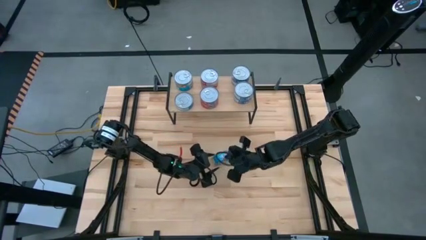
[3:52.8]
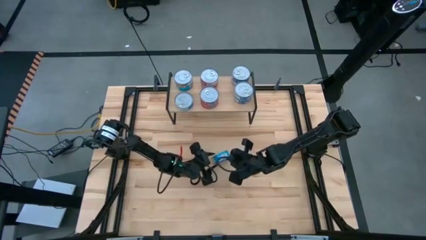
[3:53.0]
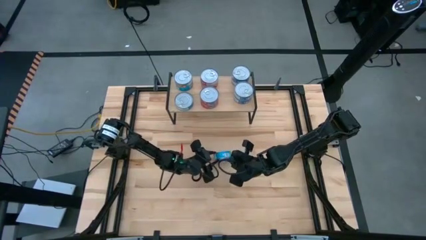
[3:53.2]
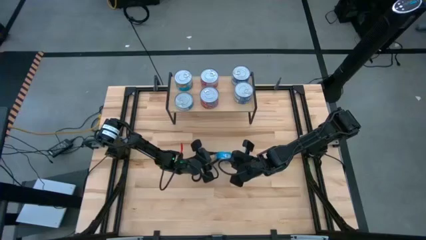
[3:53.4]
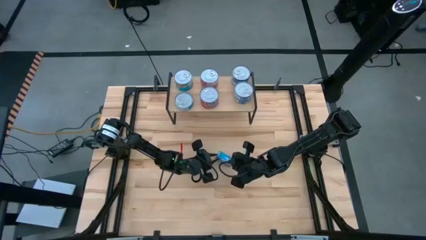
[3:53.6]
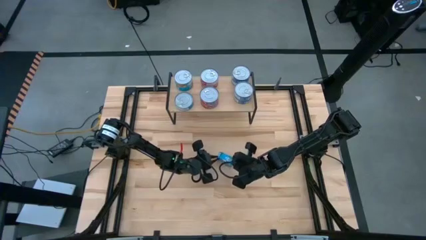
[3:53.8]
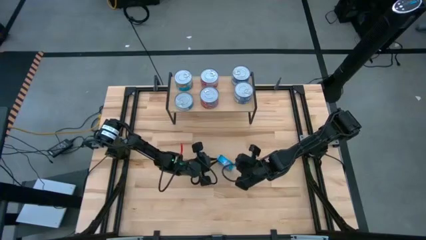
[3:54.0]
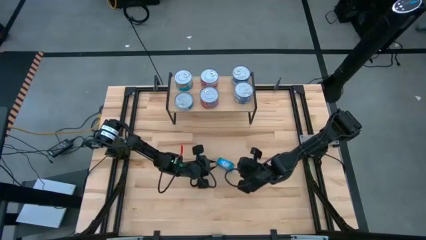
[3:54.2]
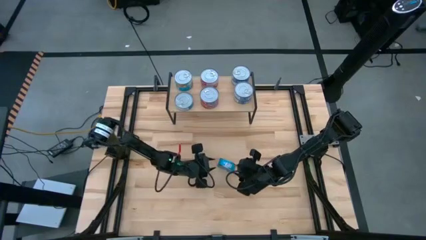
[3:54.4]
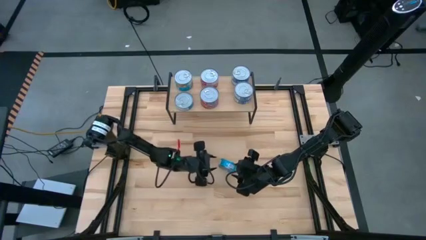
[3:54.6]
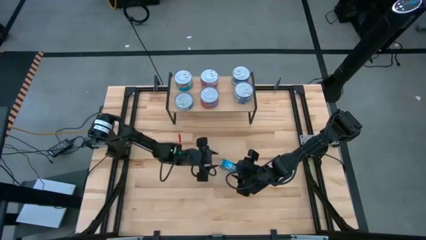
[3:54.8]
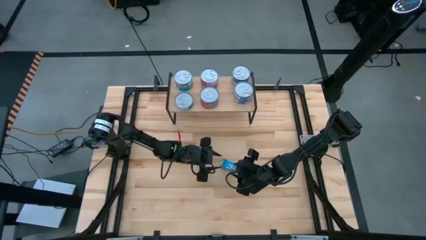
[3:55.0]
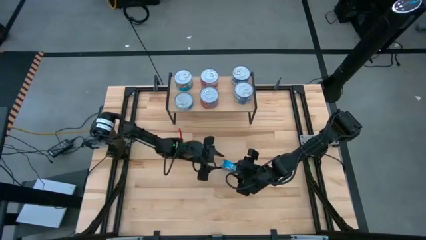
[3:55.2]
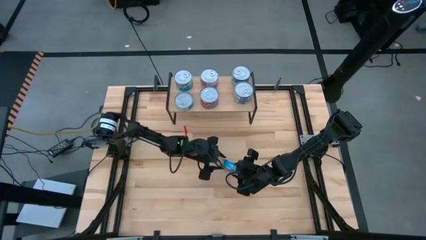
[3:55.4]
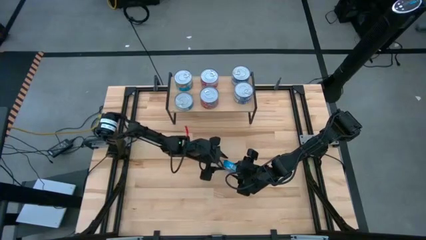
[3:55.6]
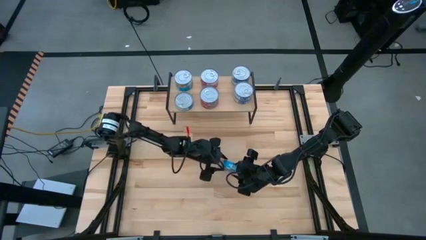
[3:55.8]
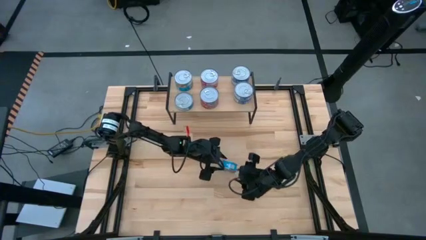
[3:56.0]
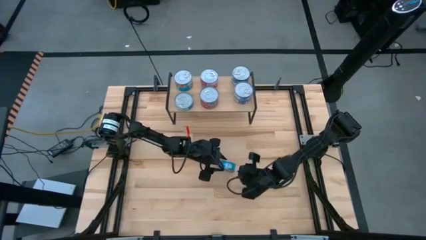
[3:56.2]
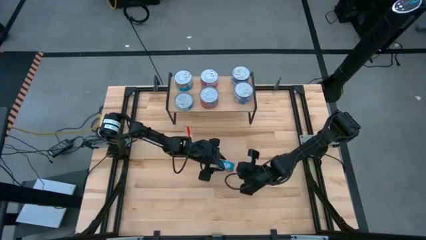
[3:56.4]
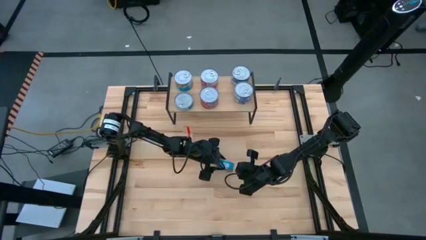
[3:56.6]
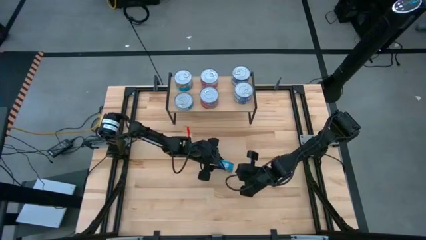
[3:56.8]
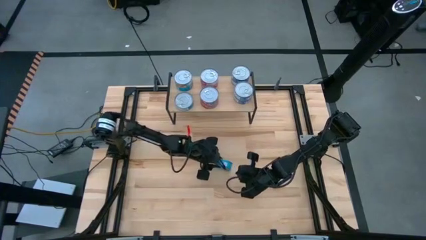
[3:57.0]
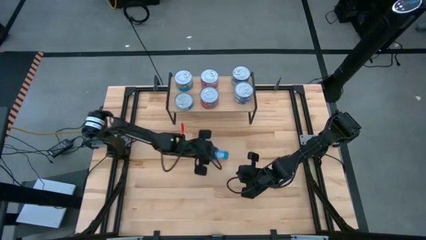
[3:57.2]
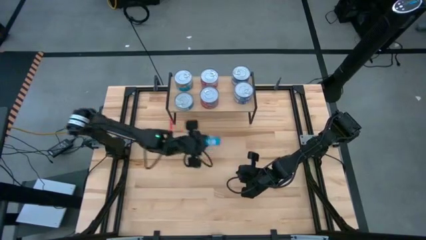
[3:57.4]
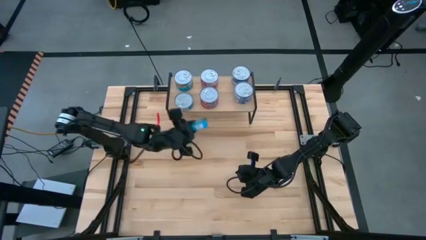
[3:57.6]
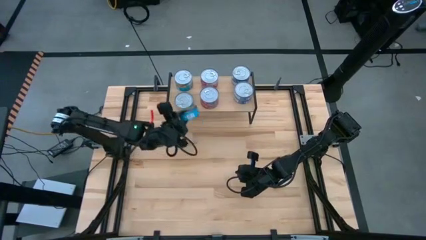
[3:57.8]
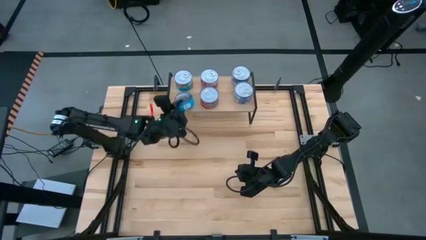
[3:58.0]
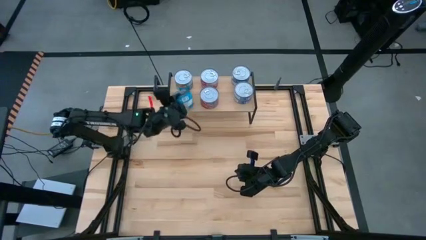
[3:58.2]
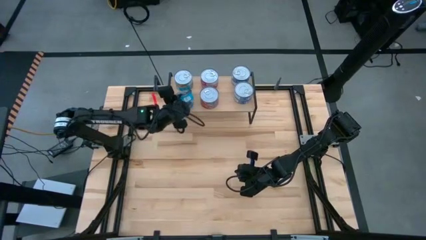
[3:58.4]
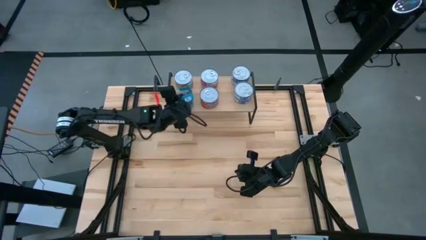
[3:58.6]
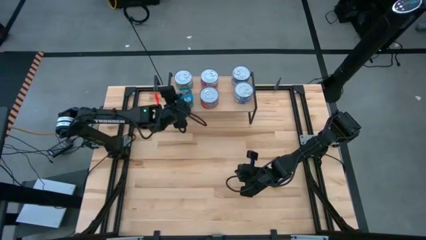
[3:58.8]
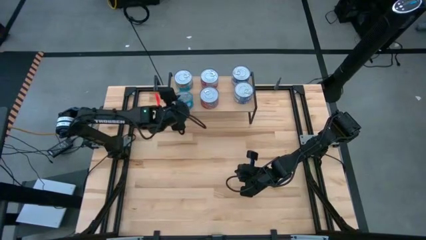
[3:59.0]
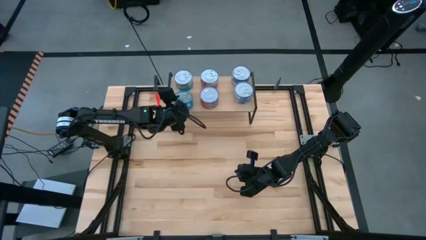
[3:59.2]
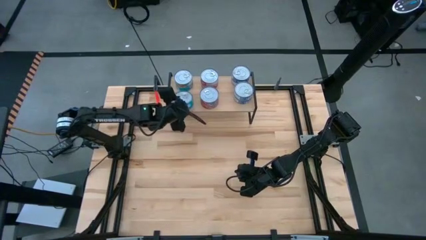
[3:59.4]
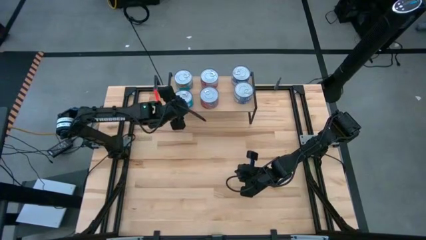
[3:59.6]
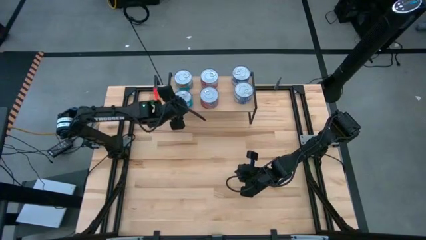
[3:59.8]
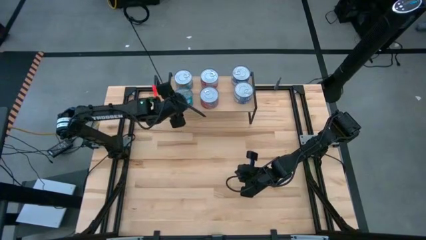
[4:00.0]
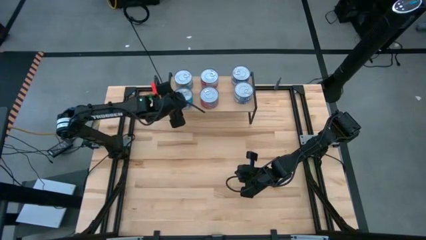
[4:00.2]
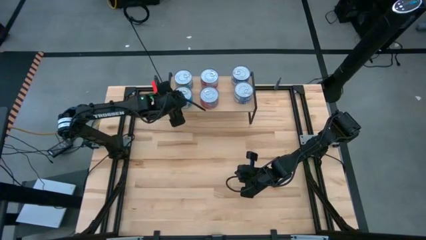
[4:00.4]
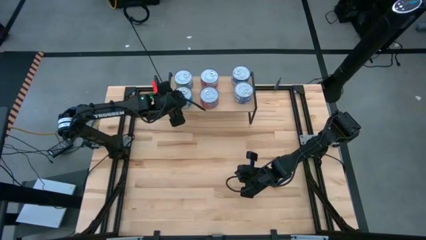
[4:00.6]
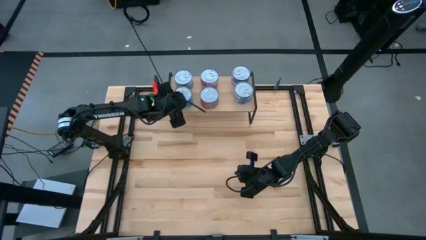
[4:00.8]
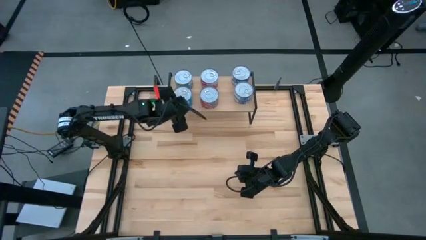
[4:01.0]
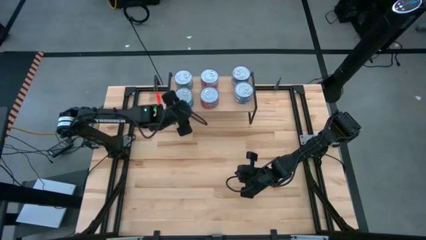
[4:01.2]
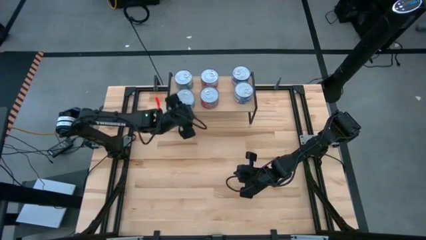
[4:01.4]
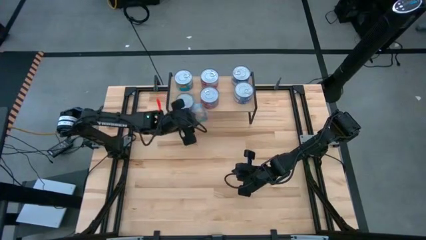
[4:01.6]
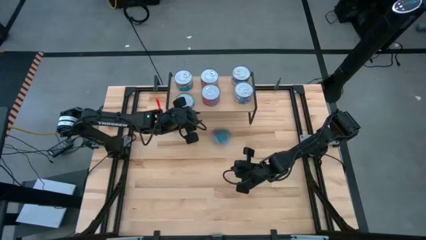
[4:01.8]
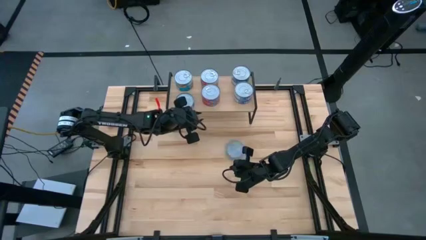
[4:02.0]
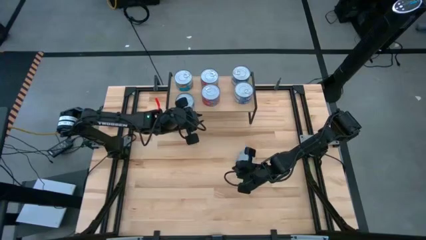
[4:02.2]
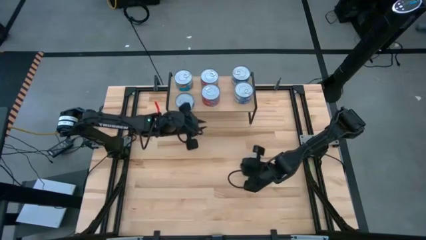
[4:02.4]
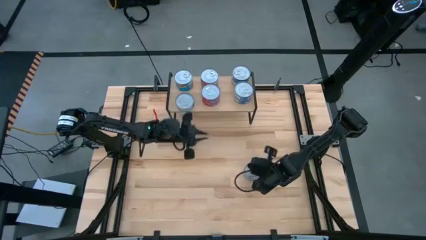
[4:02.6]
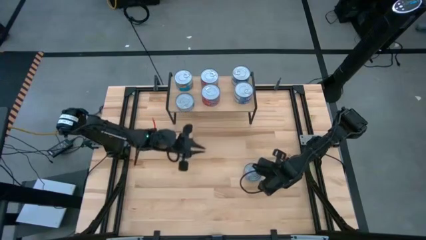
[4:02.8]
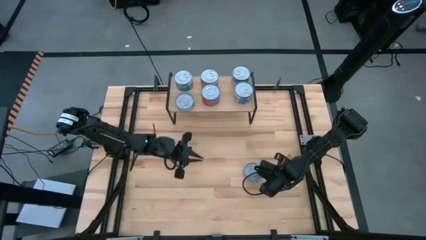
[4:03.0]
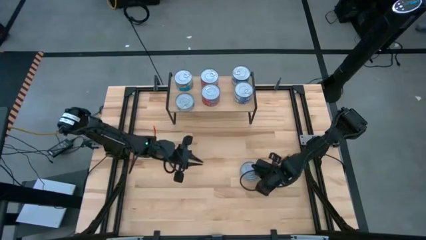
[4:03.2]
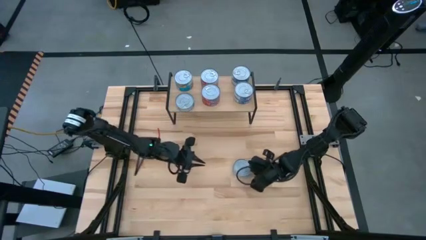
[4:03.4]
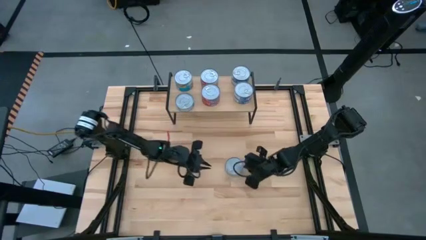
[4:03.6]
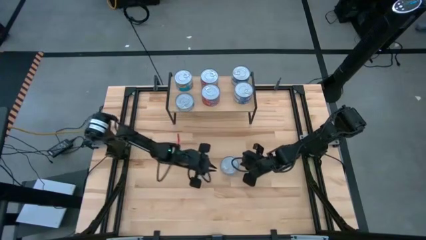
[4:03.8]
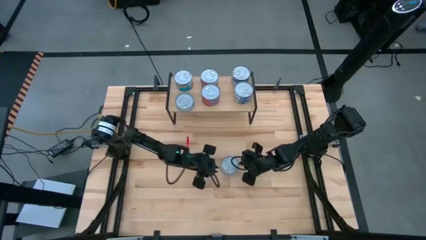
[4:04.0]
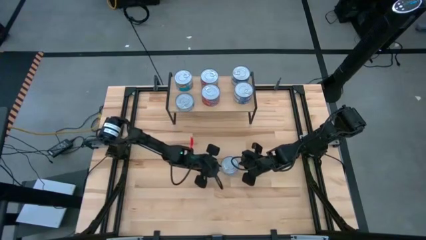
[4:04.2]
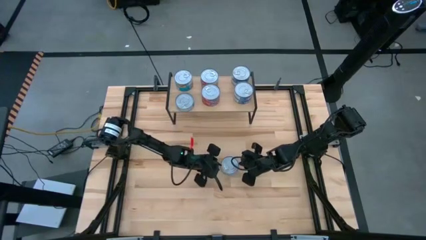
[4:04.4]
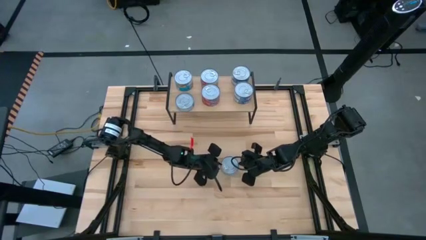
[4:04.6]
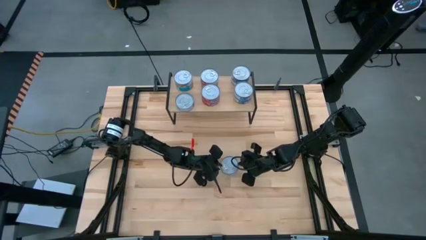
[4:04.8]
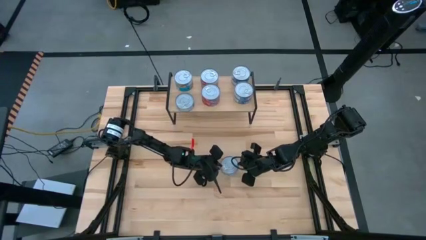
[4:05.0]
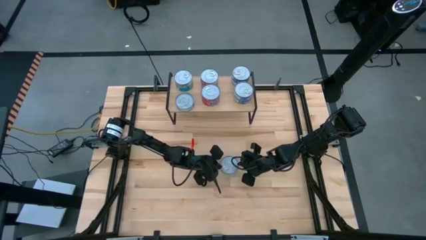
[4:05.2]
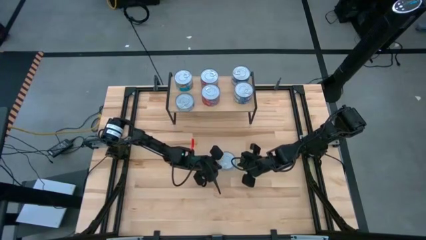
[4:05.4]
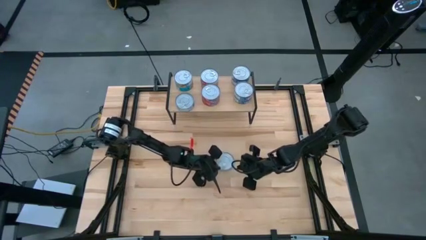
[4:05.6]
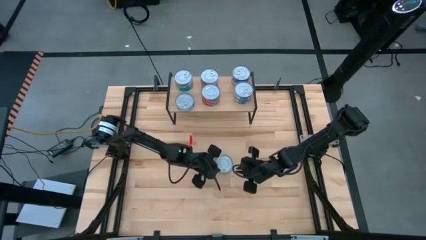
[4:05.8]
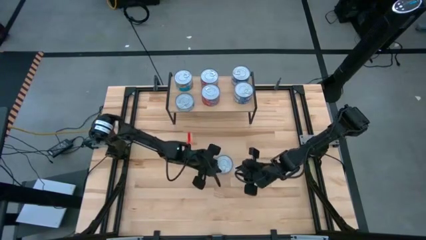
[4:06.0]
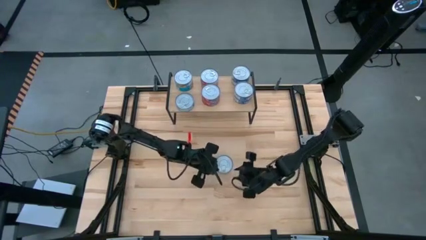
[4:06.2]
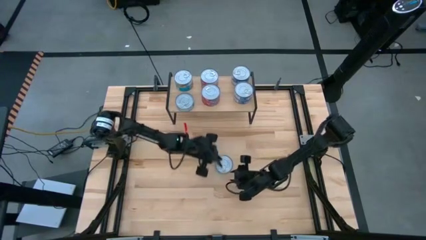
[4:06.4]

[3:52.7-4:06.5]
Task: Stack canned seafood by type on shelf
Stack the yellow blue tuna can on top of the other yellow blue tuna can on the shelf

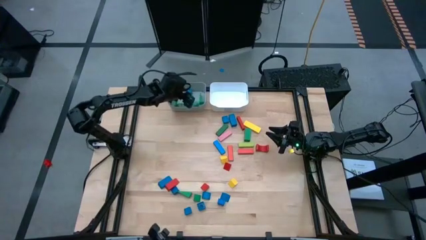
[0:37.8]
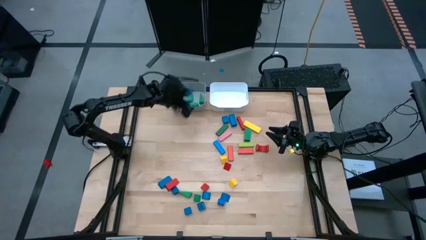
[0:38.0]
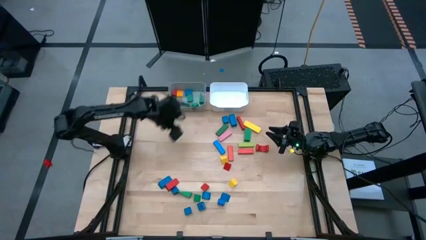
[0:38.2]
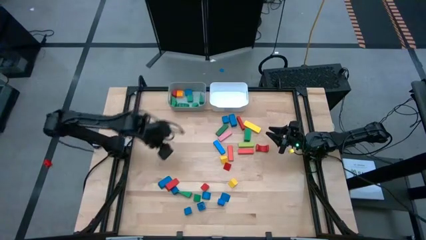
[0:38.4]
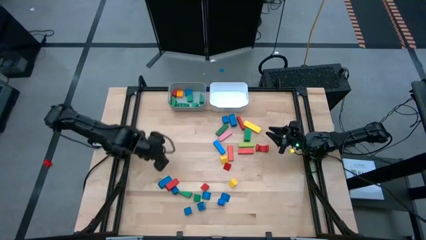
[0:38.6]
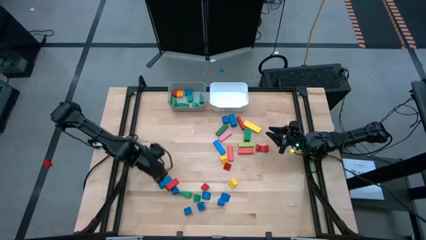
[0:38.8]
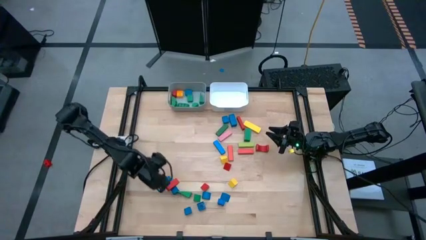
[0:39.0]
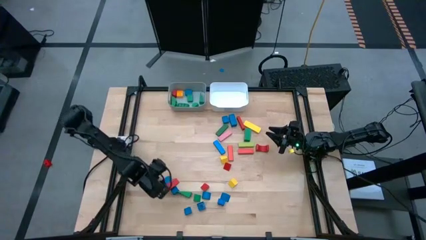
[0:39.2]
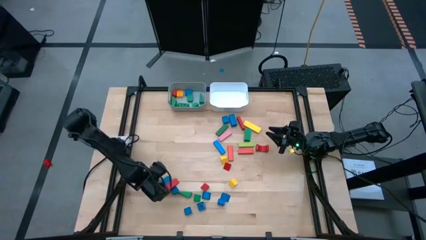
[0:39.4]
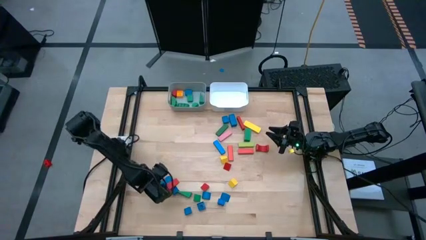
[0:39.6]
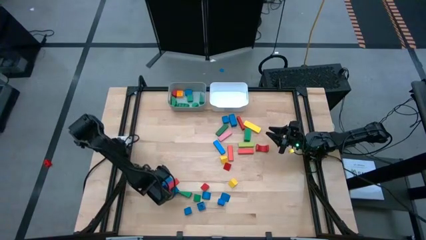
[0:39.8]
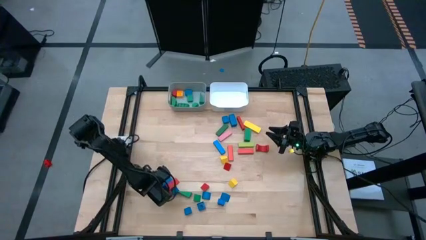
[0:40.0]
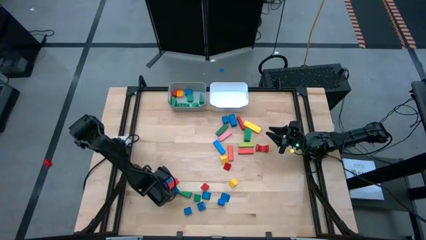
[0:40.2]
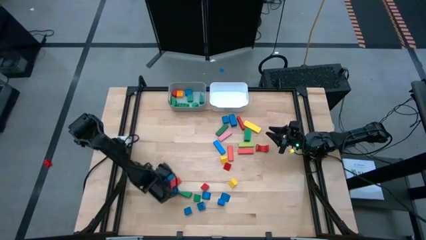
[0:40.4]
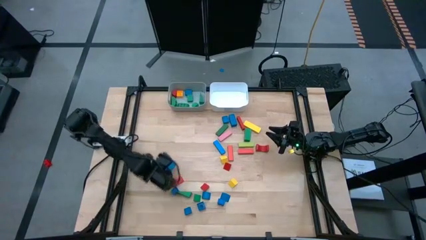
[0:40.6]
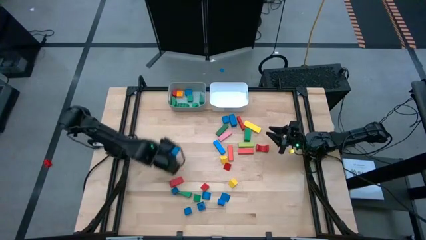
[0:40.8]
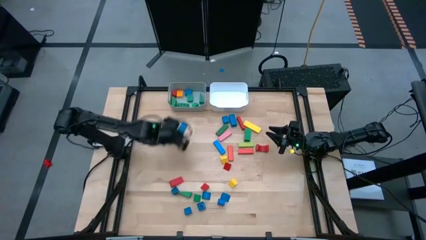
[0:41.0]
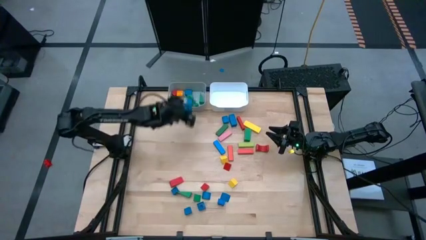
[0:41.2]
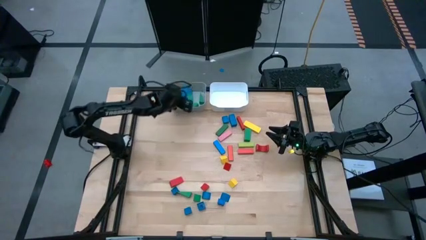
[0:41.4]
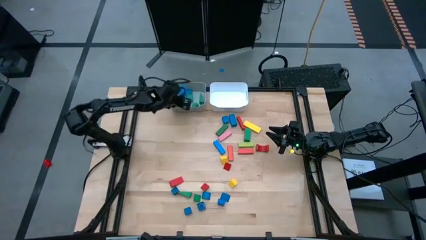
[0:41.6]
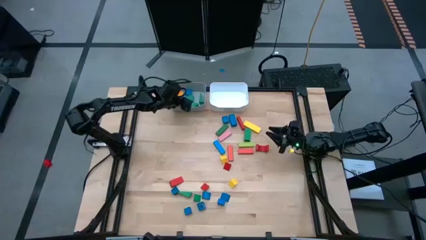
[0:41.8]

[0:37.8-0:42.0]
Task: Sort blocks by size
Put the blue rectangular block into the gray bin
